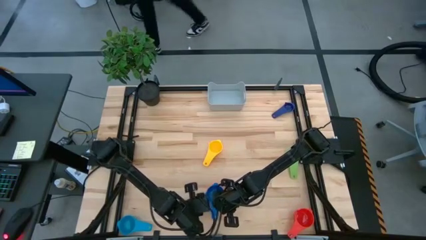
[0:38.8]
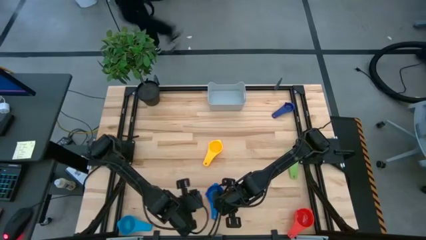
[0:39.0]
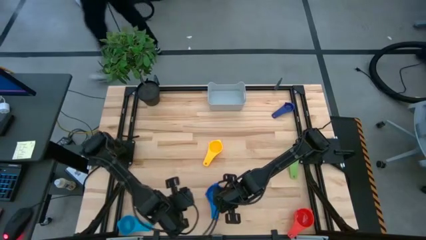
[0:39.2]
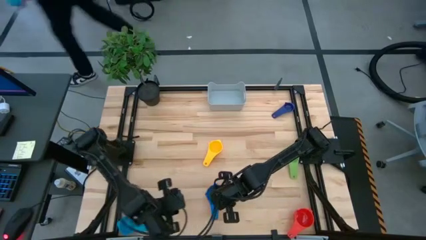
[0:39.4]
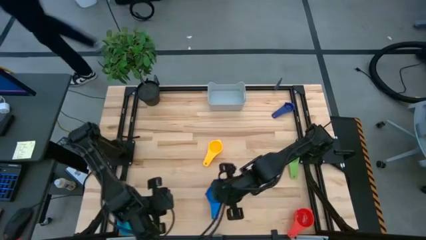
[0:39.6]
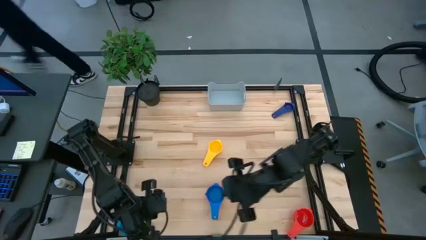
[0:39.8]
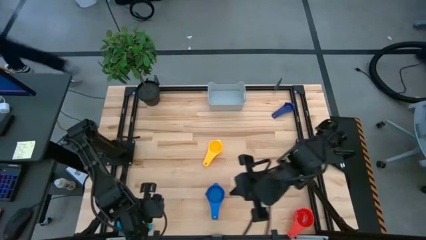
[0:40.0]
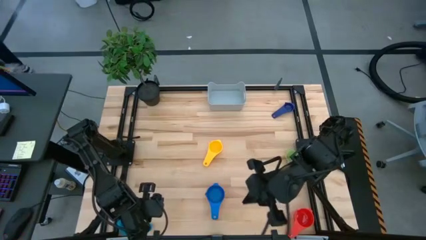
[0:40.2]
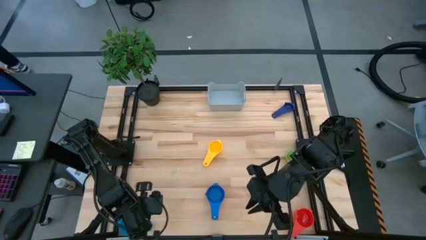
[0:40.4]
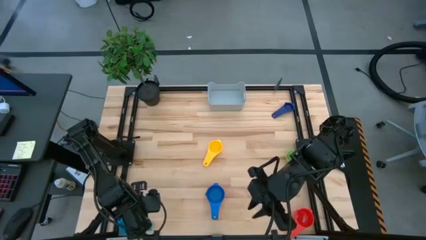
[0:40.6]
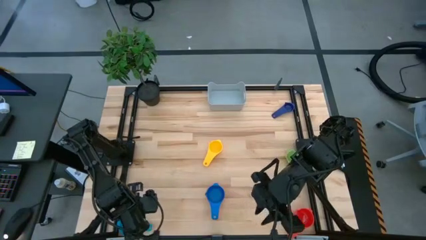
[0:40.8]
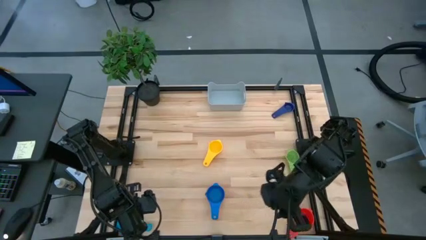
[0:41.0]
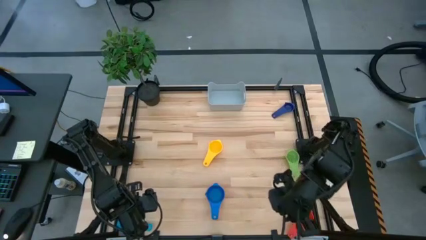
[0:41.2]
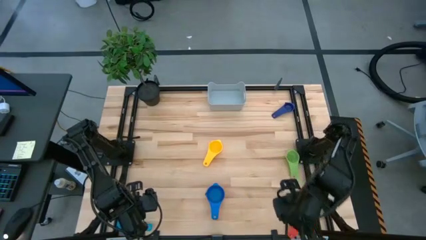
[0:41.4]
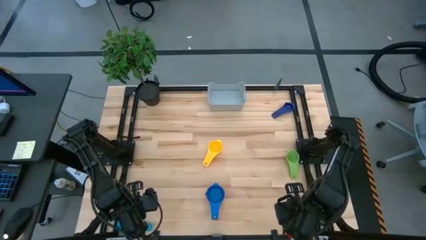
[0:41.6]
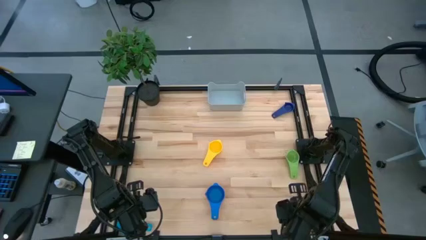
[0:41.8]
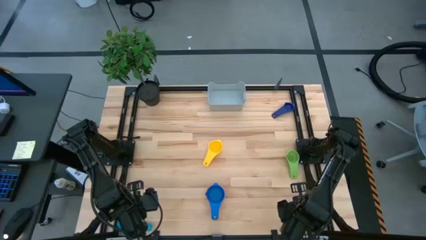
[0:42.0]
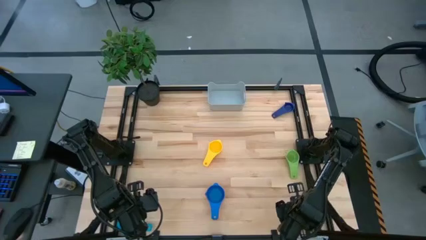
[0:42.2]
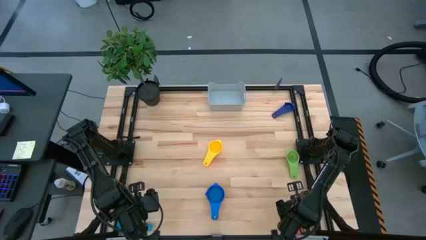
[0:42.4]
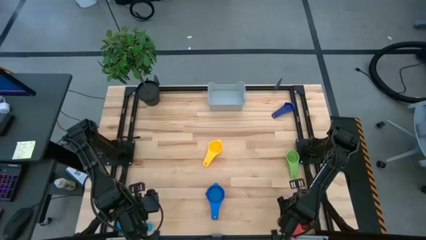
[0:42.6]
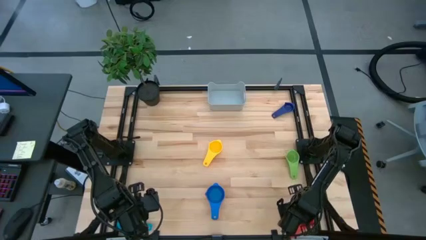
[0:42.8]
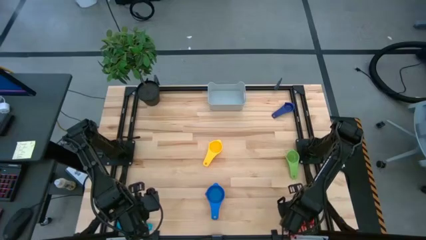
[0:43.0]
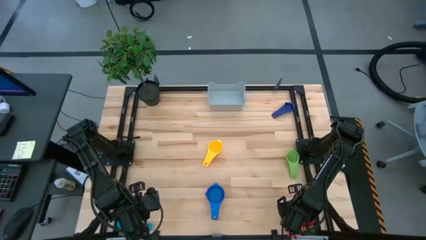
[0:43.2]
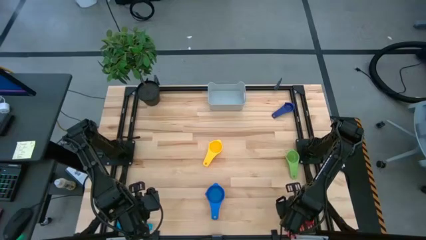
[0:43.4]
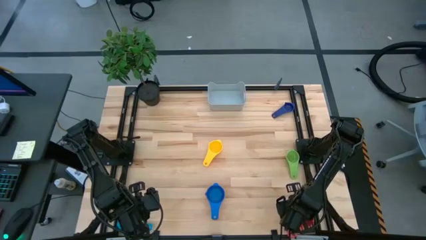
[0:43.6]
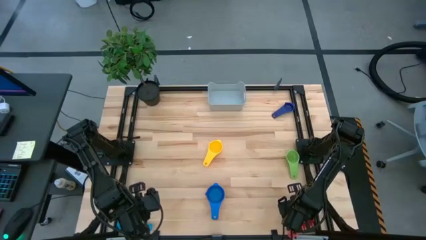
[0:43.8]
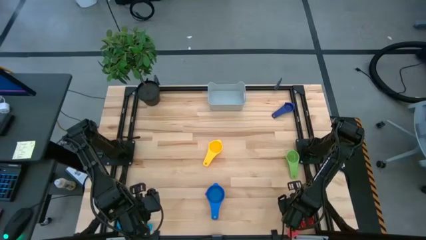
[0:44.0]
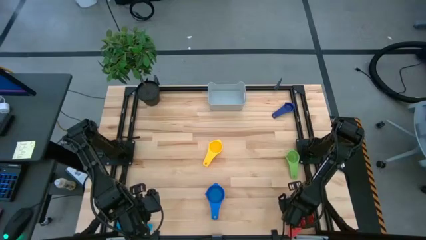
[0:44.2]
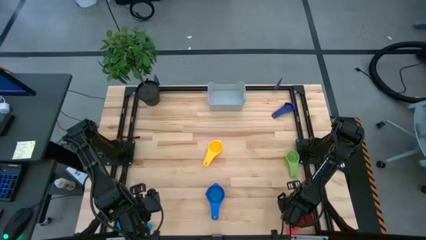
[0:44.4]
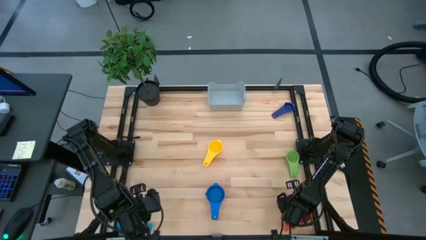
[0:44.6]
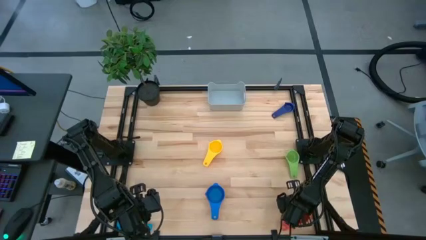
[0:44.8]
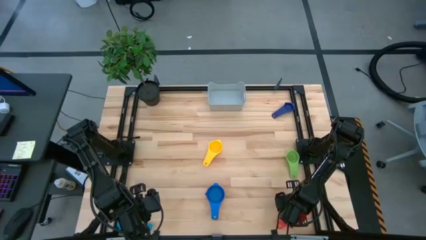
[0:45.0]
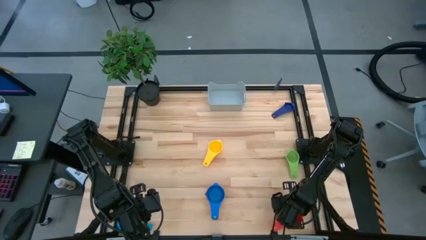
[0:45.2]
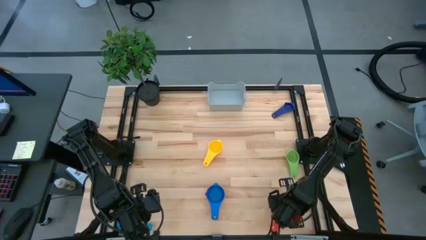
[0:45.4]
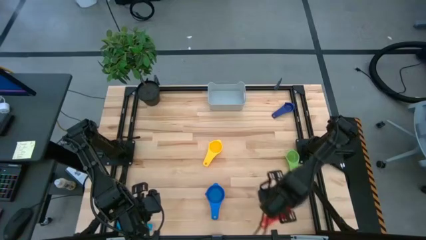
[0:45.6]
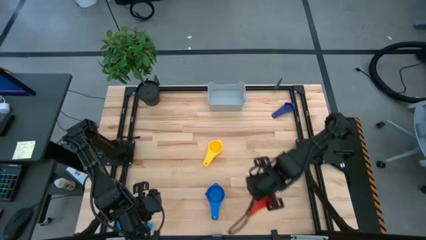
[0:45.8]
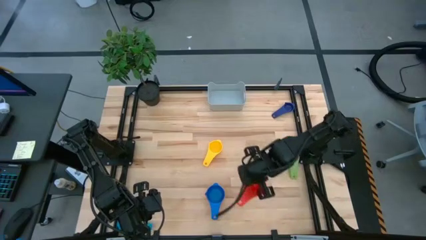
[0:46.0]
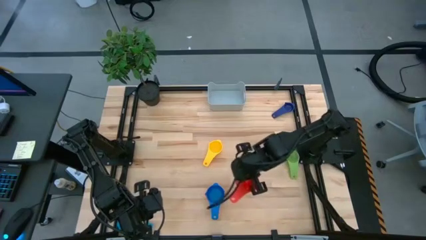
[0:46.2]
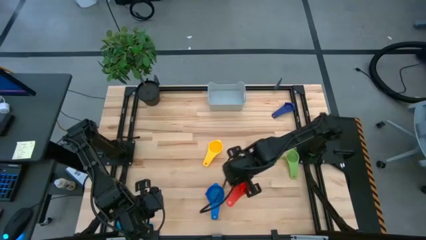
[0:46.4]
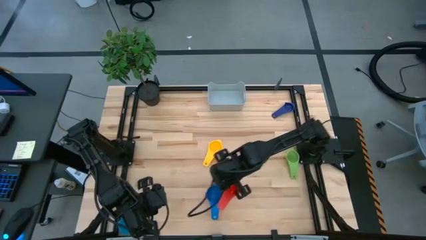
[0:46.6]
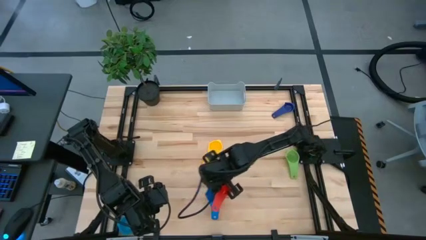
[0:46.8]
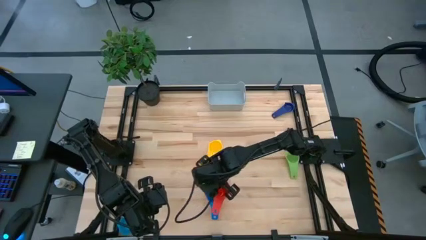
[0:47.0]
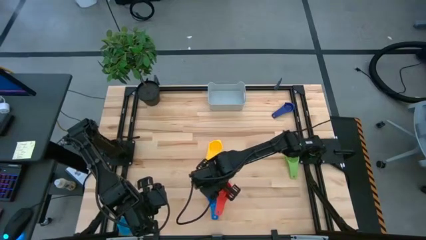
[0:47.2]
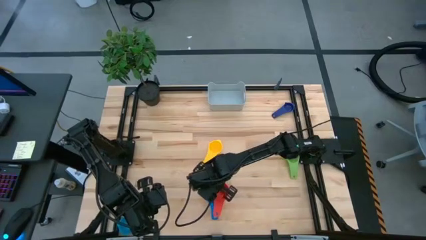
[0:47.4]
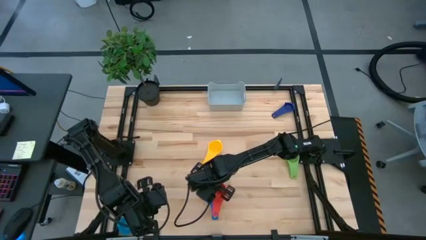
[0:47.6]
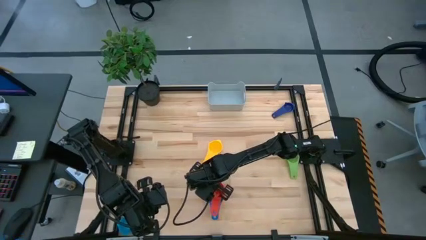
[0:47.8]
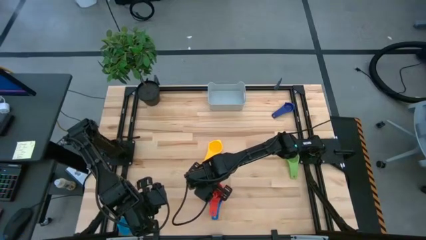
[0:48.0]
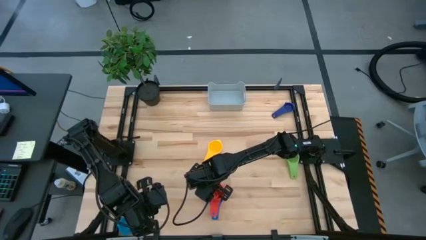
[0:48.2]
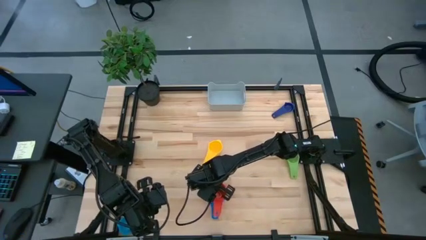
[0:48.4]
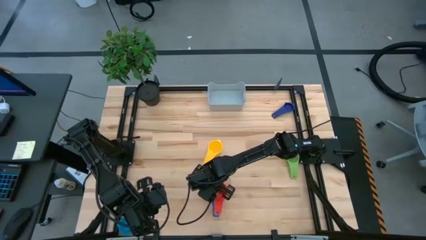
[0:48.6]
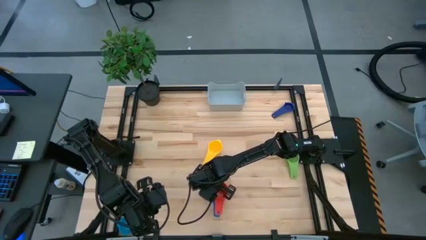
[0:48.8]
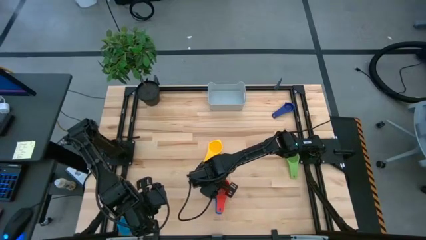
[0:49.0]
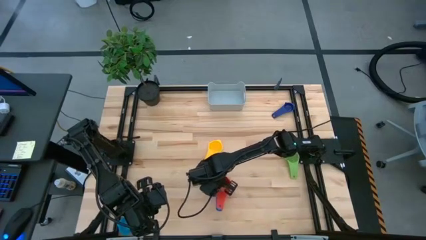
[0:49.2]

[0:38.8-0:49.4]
Task: Nest measuring cups in basket
Stack the red measuring cup on top of the blue measuring cup

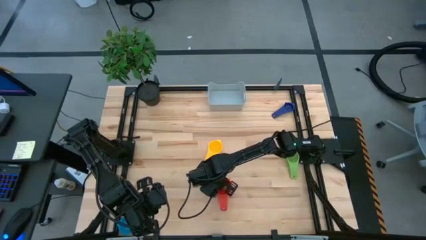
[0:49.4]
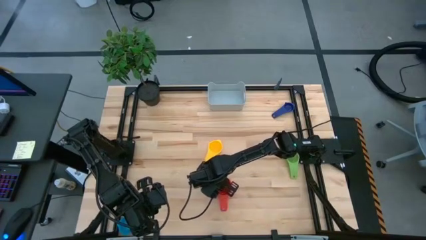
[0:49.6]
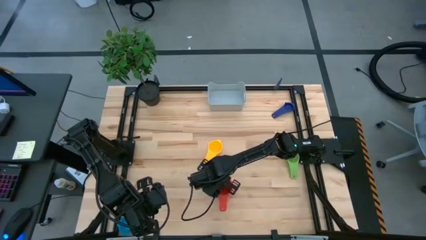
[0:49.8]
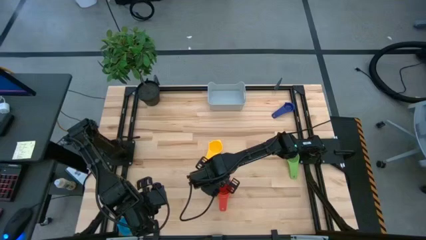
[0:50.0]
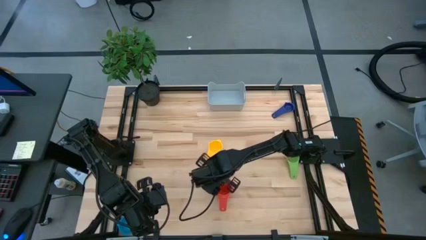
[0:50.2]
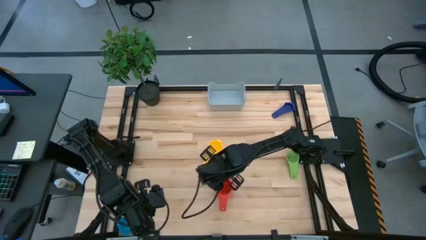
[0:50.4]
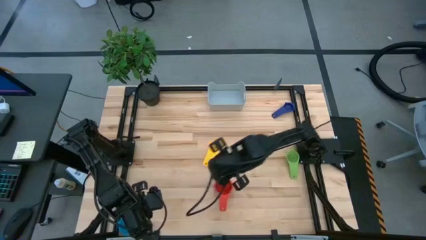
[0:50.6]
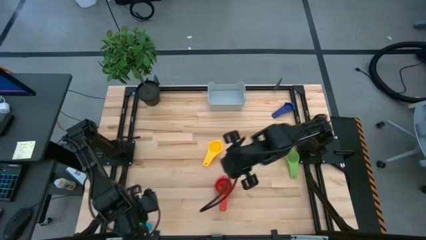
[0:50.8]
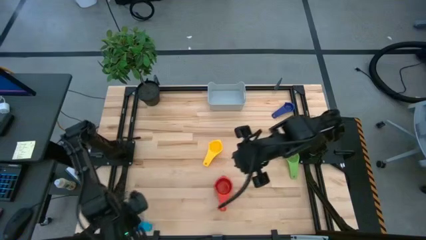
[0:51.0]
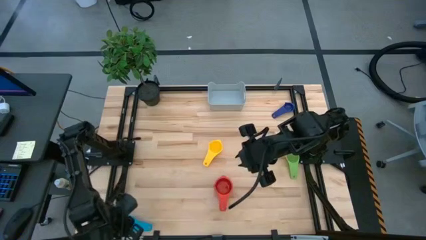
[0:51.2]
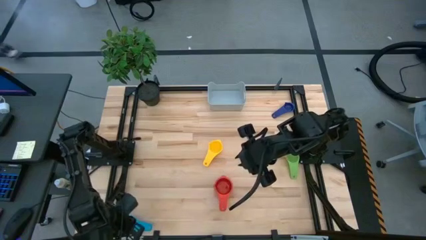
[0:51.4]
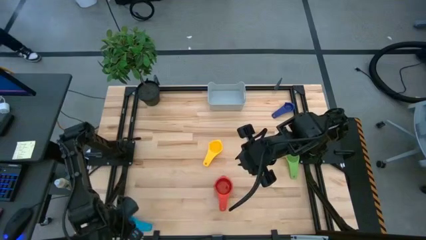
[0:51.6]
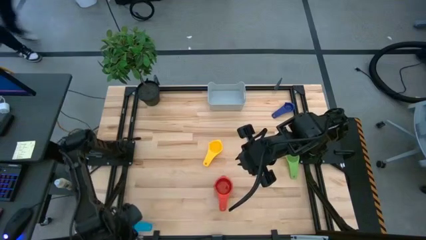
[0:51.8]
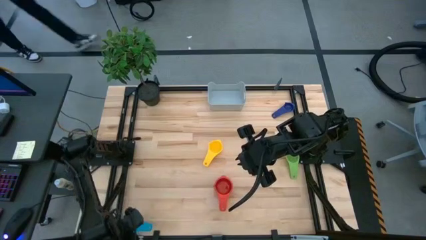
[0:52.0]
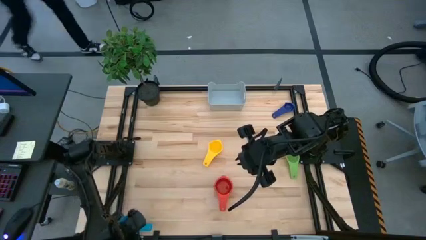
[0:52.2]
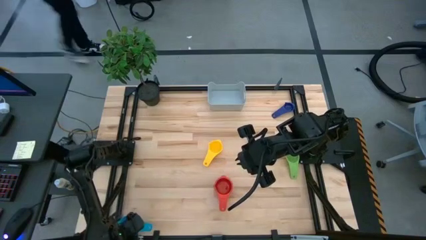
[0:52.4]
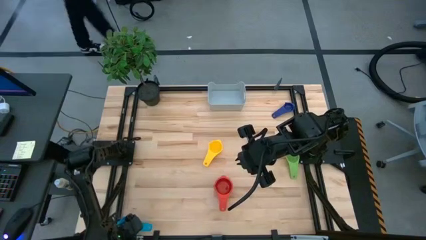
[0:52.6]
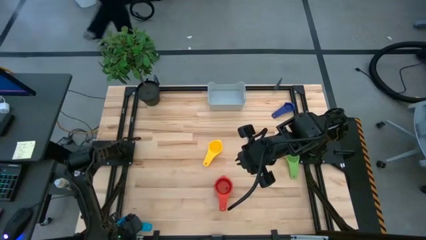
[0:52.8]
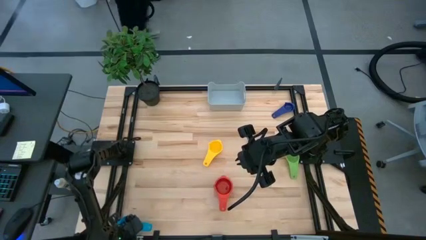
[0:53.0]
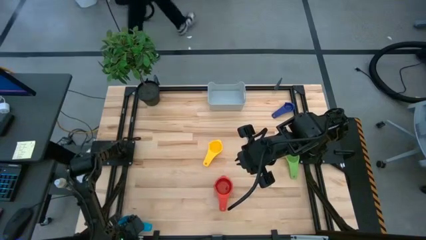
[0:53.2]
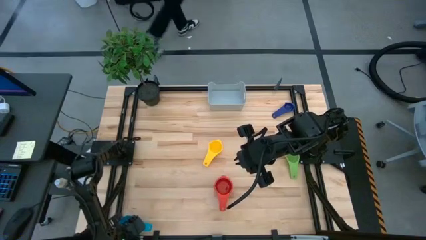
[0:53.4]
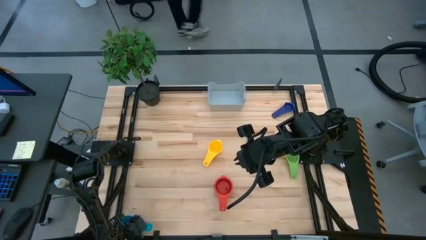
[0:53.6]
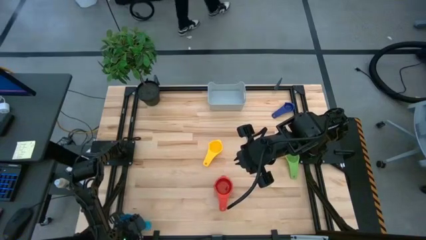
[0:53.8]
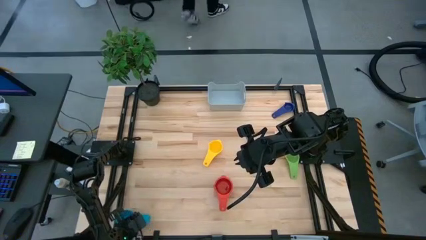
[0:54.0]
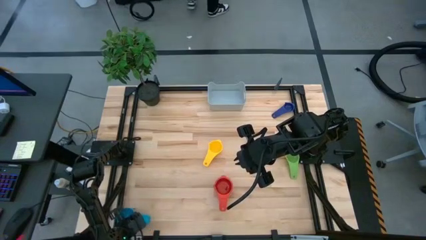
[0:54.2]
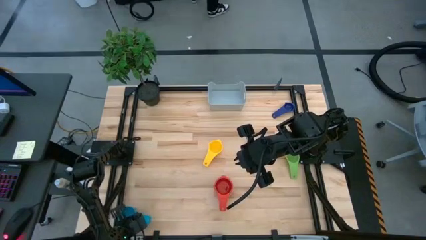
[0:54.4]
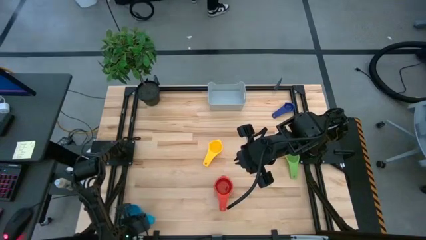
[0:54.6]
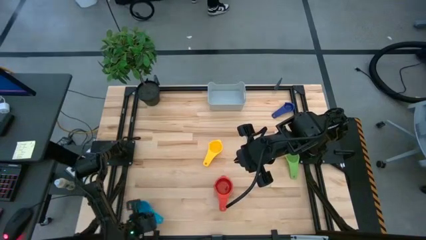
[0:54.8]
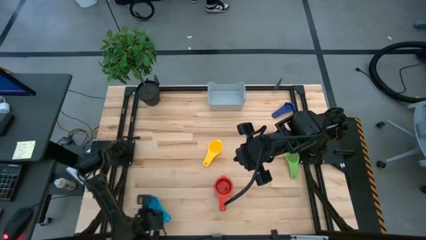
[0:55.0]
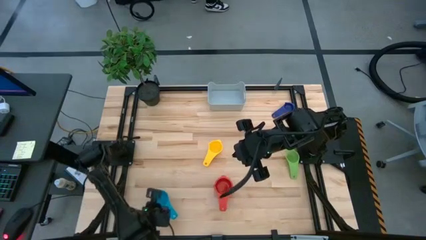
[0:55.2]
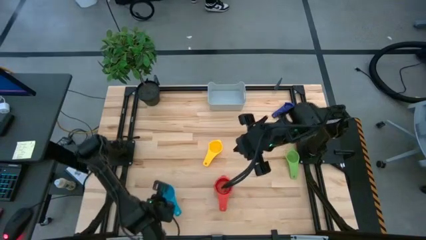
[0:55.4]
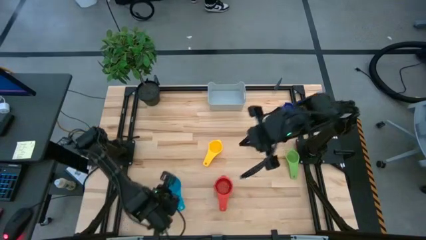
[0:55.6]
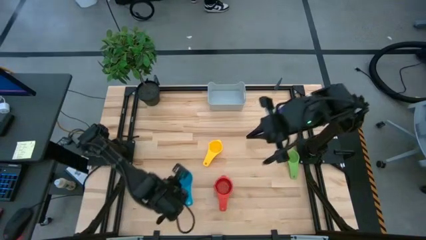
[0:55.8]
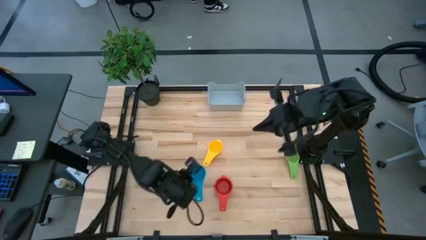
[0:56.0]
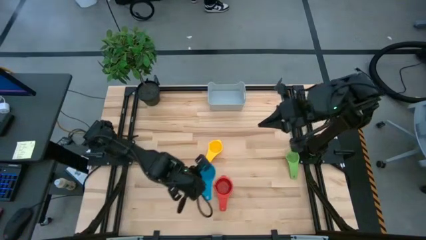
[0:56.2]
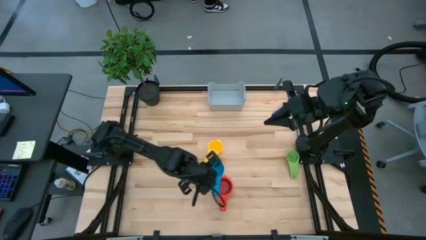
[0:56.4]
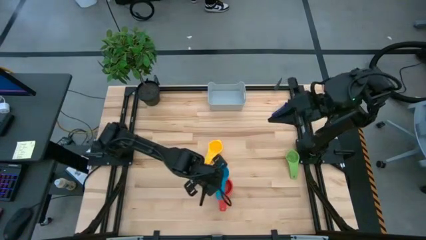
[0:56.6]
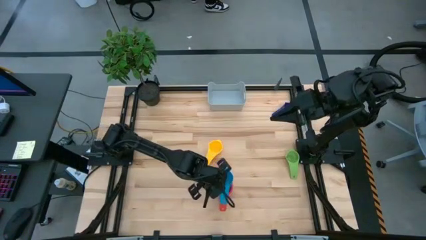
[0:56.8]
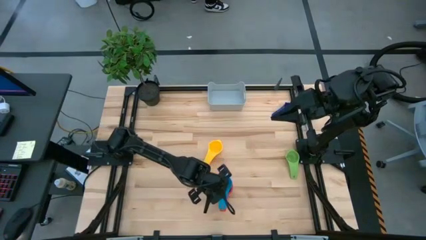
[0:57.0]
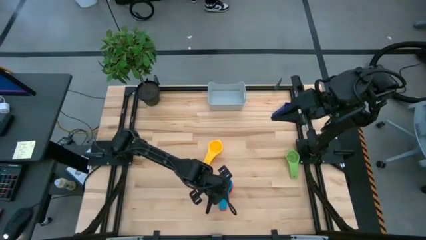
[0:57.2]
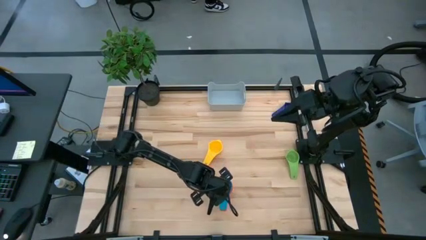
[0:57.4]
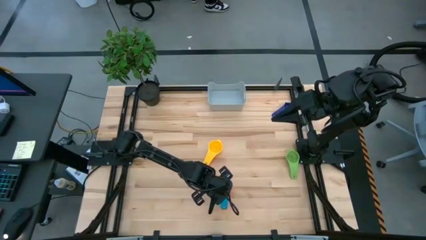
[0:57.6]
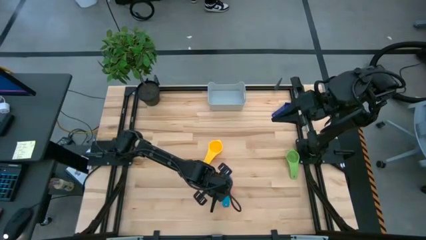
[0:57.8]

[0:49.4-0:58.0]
Stack the light blue measuring cup on top of the red measuring cup
